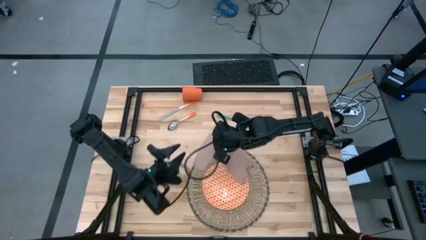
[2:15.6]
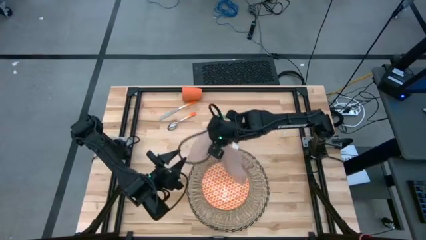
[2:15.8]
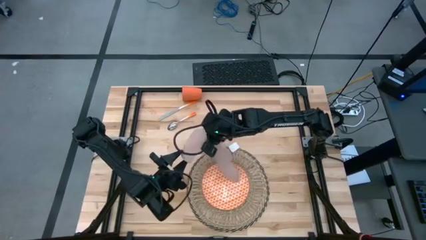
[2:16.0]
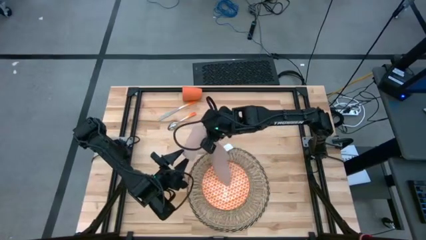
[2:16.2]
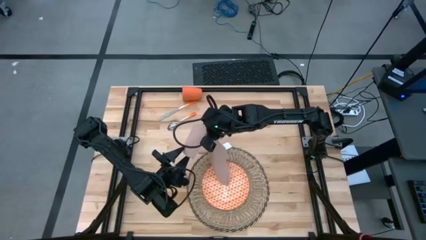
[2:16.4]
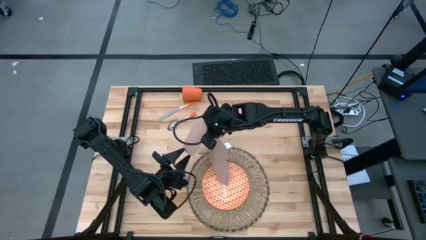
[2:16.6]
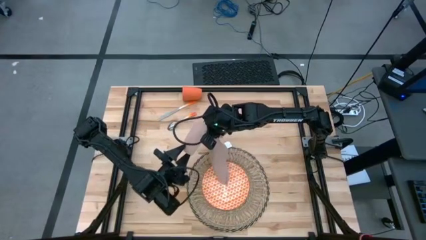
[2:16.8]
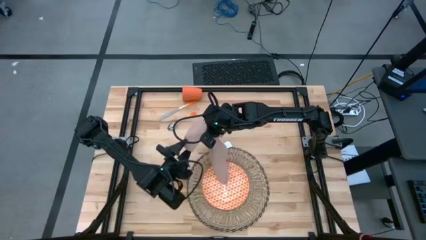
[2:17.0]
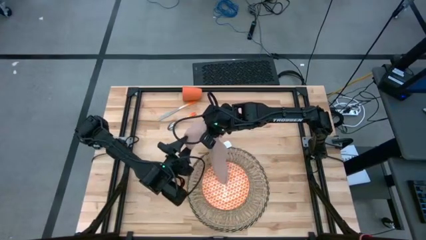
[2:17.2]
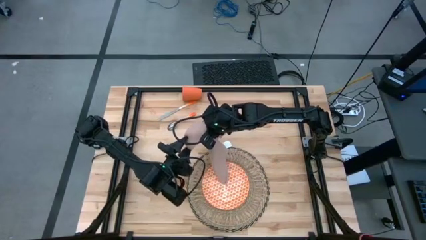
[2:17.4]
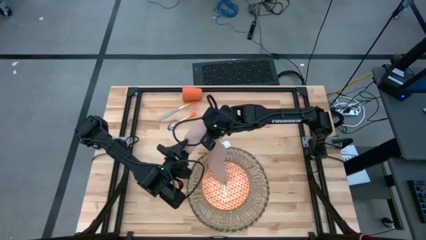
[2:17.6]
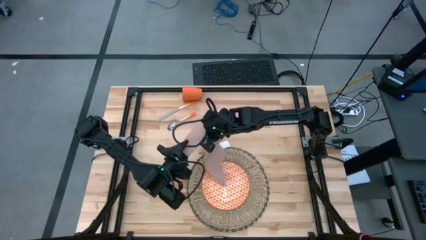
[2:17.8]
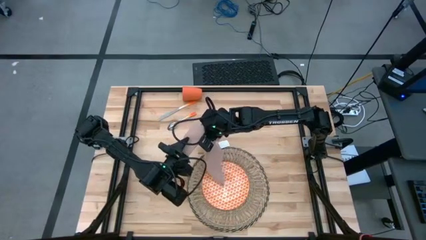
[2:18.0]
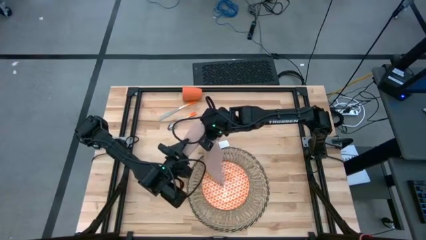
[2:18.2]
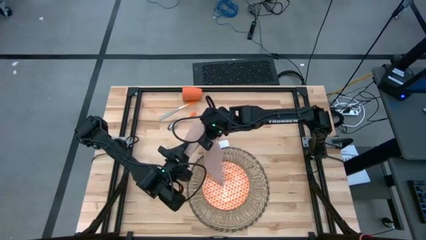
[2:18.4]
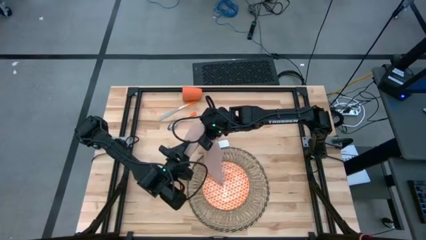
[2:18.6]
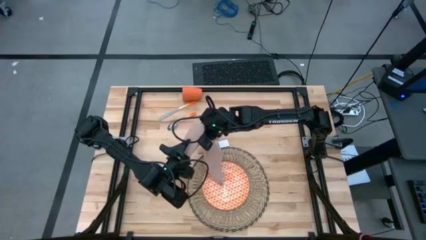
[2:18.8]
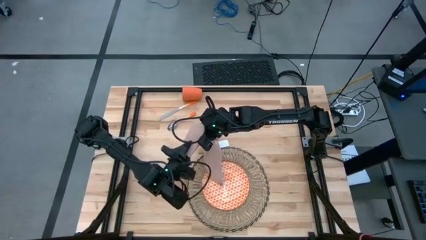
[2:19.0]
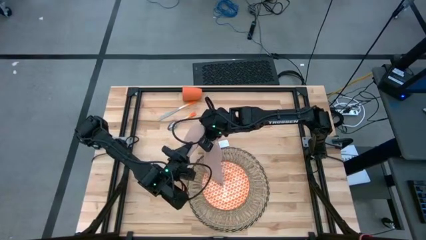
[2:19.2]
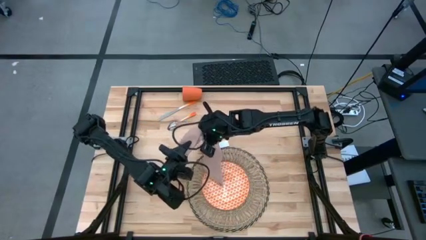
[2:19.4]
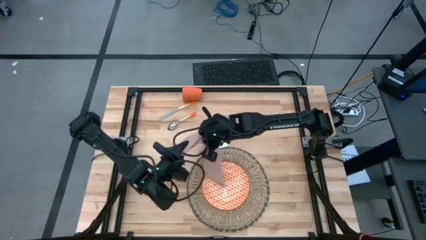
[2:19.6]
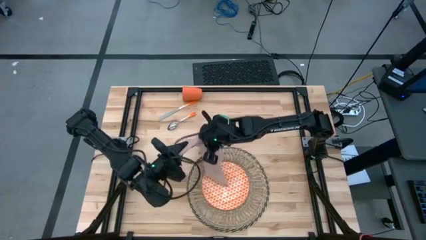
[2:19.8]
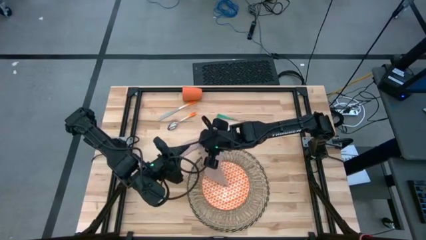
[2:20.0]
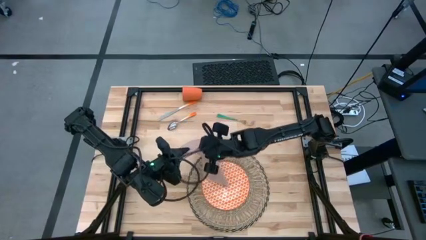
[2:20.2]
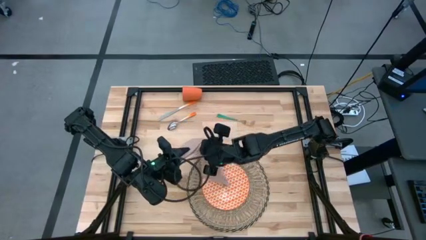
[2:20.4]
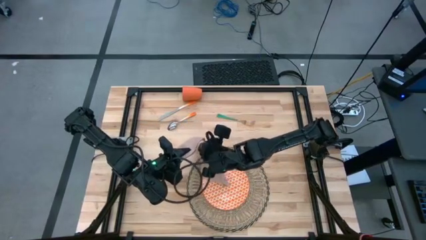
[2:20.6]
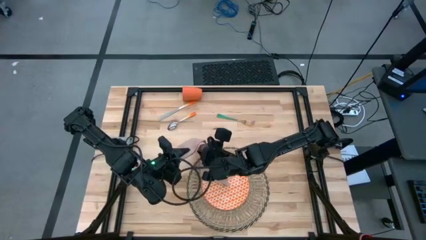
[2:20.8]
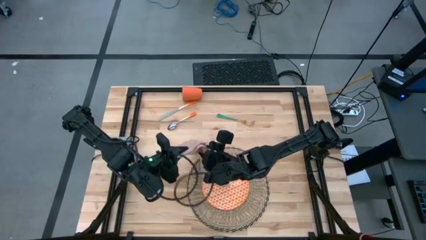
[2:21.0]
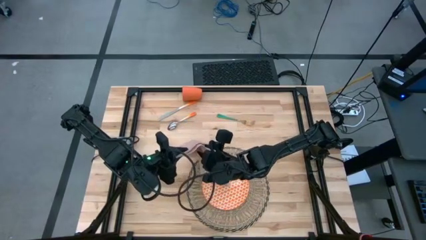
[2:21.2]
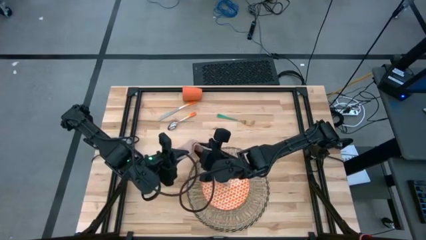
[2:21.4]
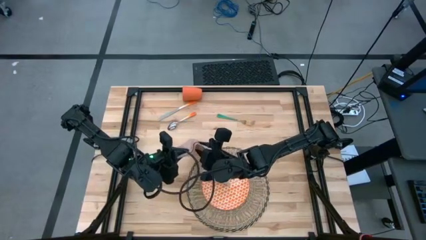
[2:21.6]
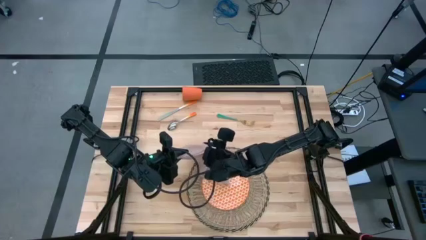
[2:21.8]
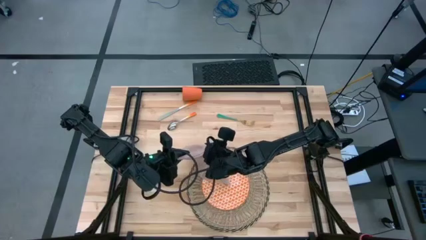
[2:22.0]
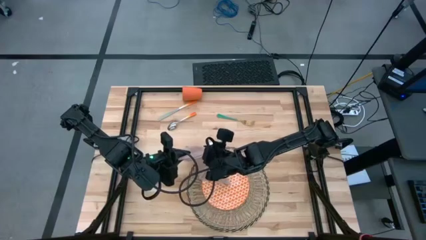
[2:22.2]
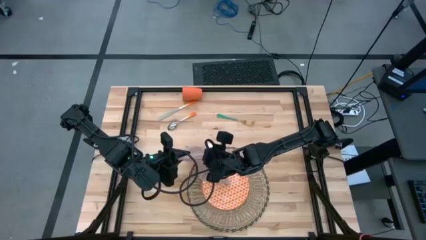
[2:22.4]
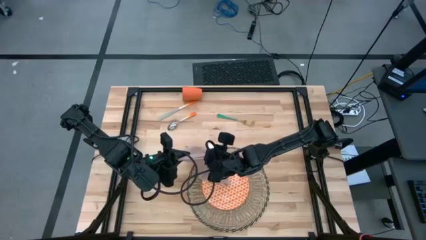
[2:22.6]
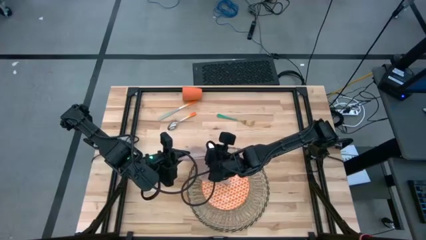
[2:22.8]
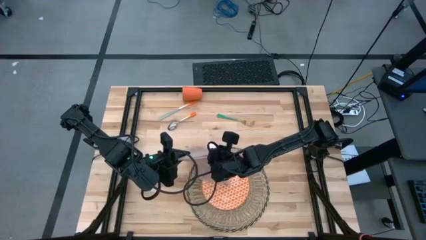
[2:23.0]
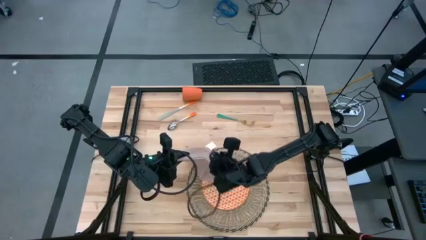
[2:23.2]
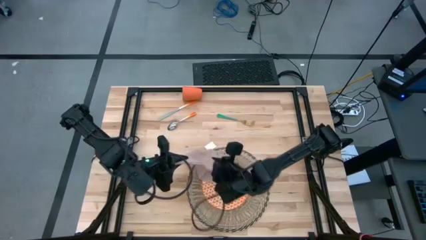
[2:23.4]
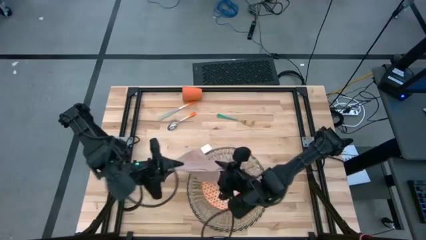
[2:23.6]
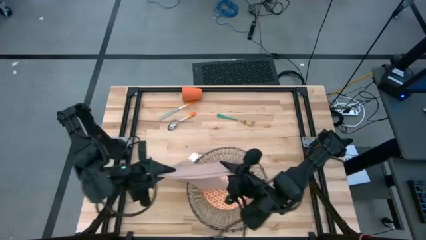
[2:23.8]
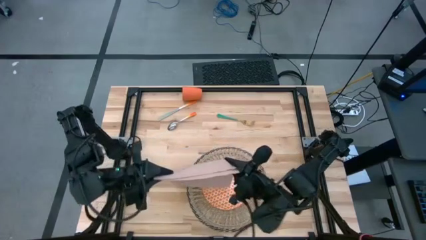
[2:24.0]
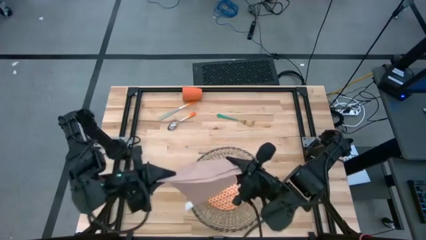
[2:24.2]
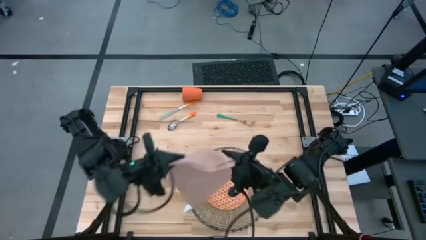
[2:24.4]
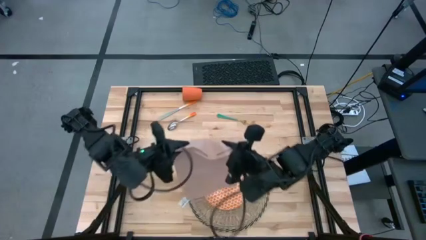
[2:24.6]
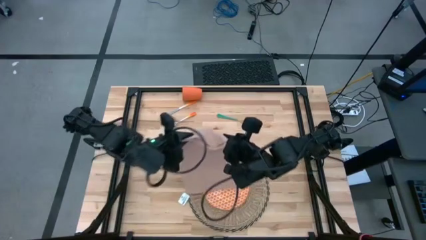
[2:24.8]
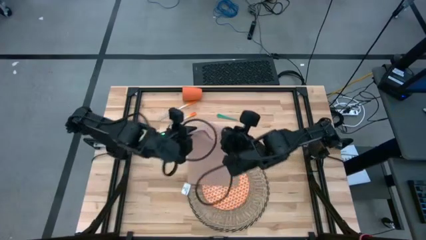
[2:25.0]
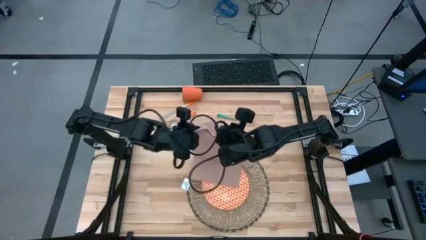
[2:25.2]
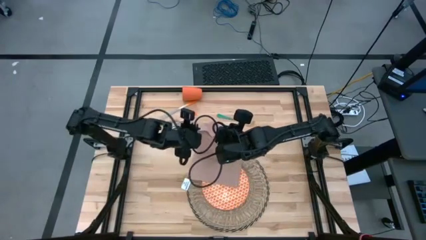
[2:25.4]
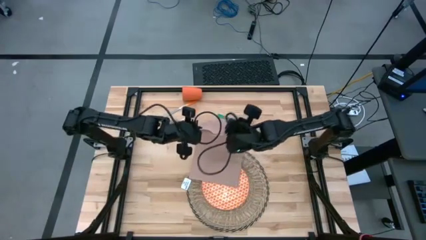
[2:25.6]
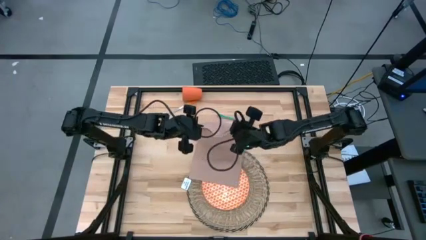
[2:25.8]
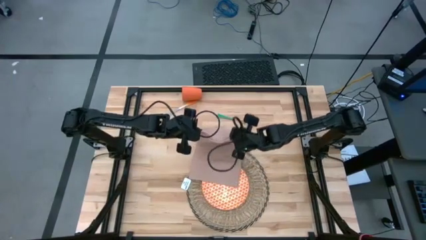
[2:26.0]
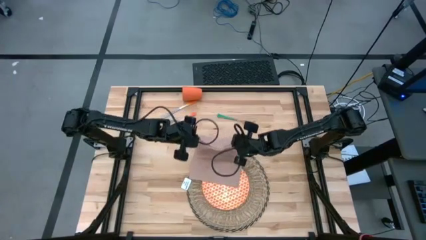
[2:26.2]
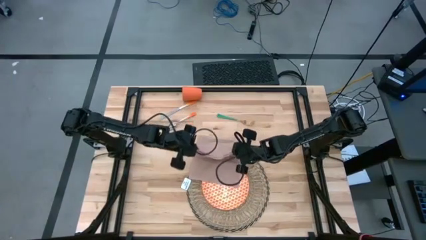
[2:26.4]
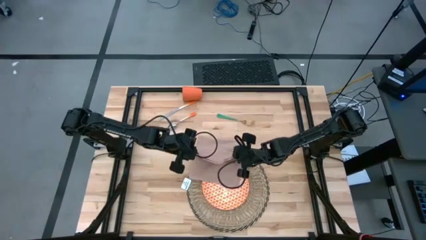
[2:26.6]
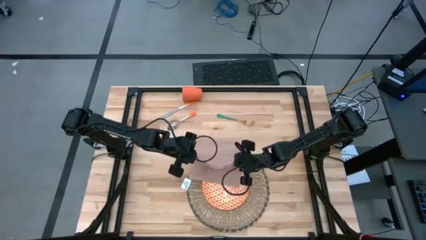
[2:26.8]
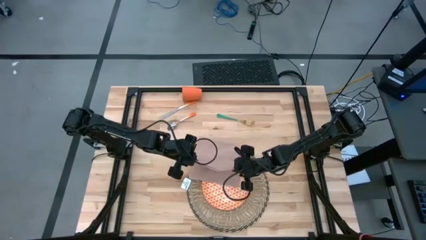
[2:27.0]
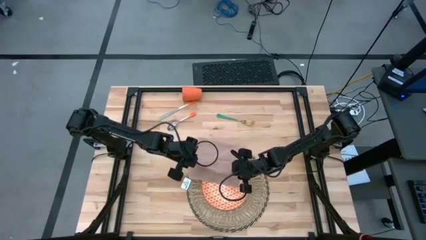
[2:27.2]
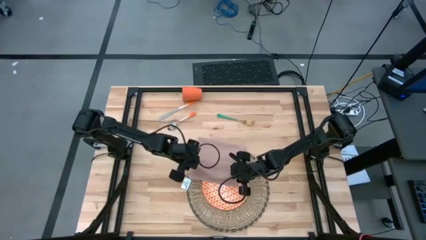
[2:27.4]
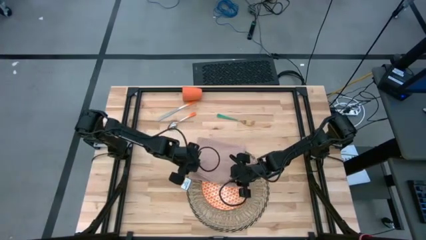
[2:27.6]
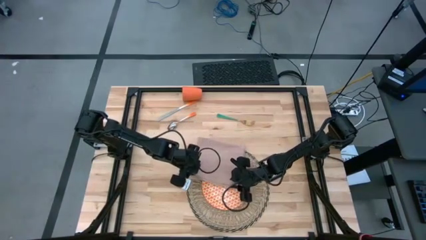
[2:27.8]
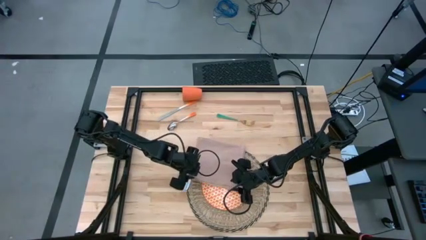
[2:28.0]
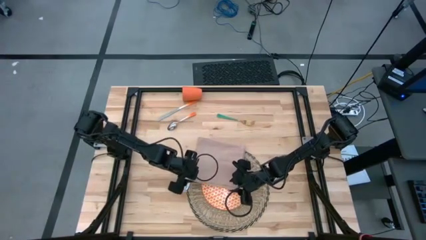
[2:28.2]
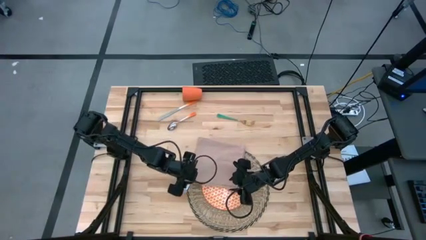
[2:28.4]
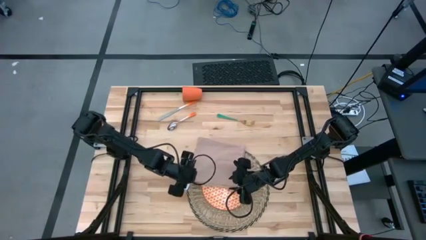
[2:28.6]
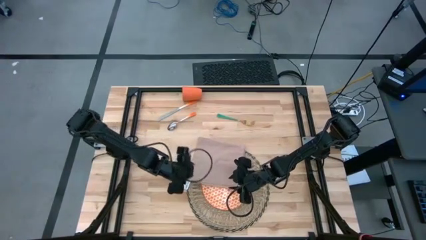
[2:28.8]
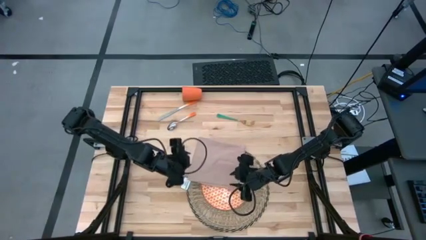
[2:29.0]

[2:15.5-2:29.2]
Task: Set table place
Fold the napkin

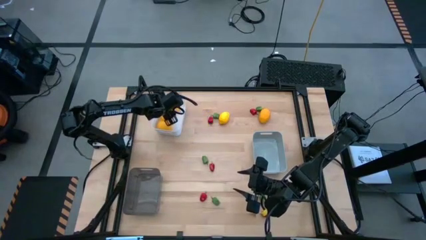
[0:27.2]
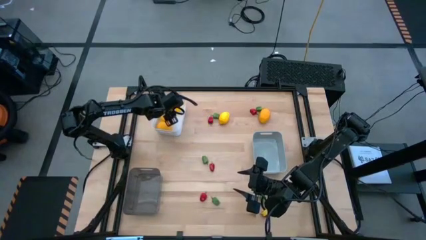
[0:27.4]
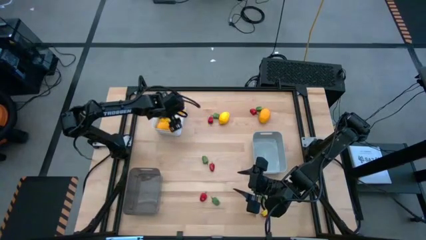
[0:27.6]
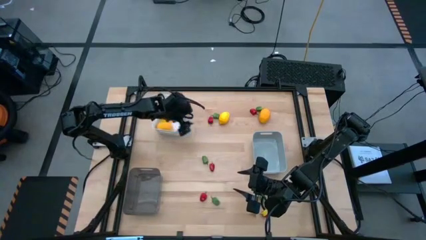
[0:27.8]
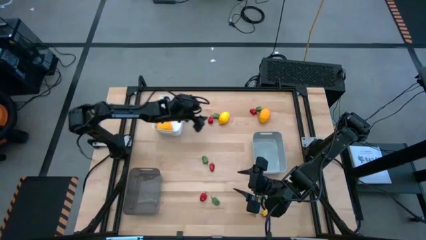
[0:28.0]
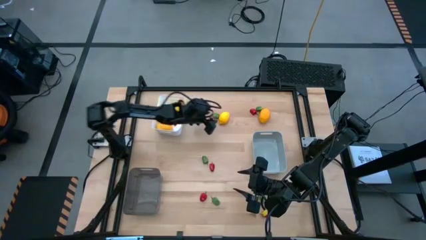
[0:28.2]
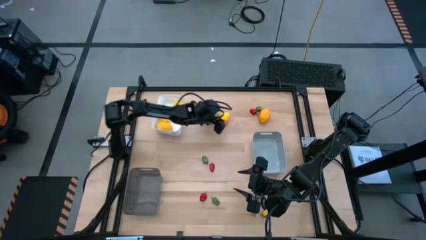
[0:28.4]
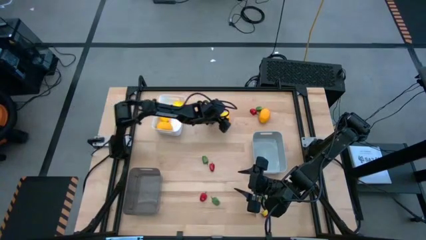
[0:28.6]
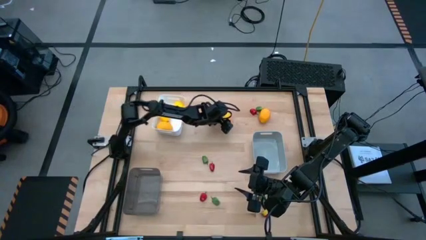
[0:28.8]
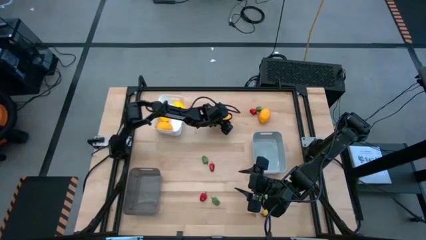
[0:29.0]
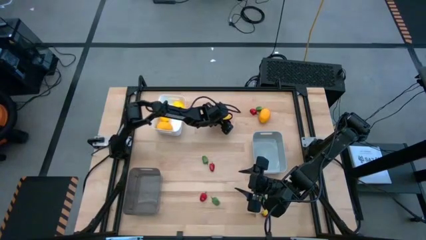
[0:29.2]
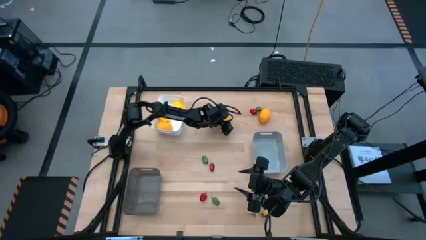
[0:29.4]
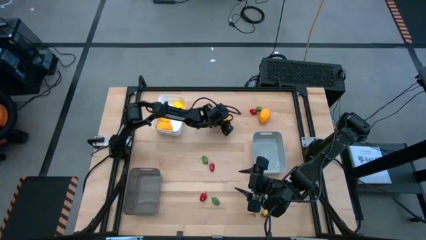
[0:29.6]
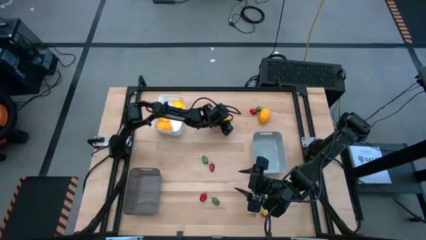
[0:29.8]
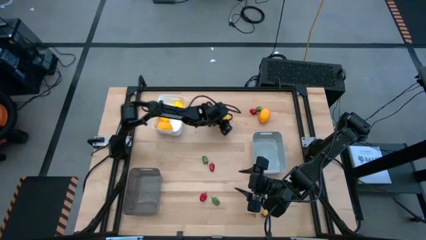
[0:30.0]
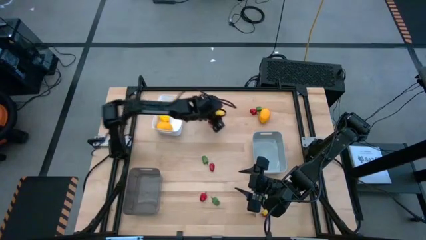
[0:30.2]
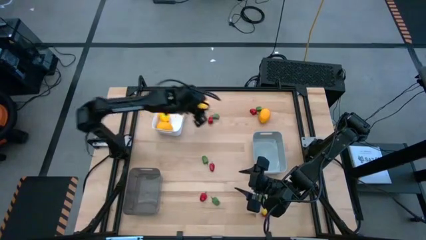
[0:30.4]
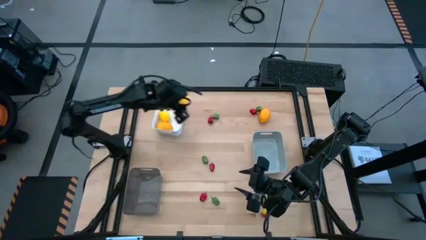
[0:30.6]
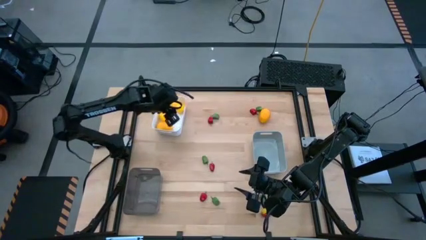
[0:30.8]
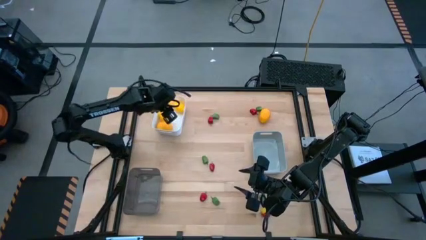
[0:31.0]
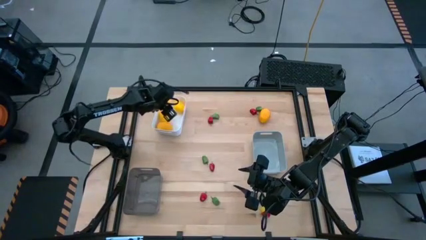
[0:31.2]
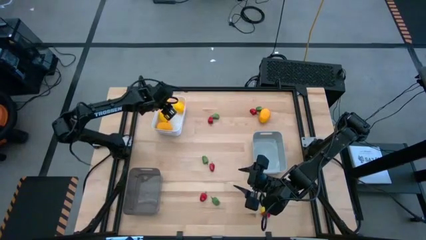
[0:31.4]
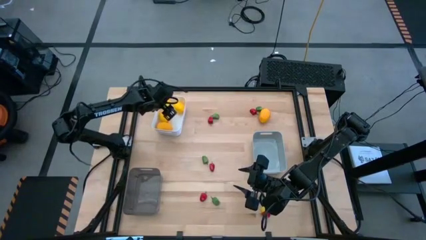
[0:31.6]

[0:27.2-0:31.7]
Task: Sort produce into baskets
Put the left yellow lemon into the white bin
